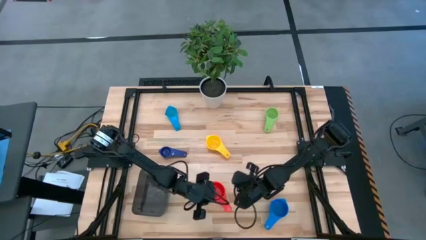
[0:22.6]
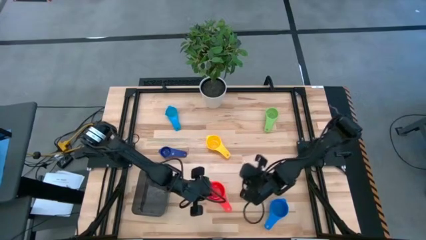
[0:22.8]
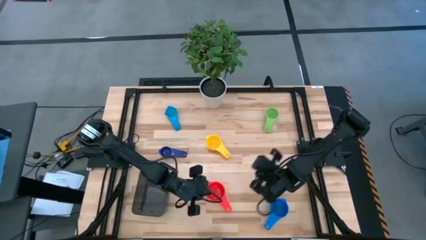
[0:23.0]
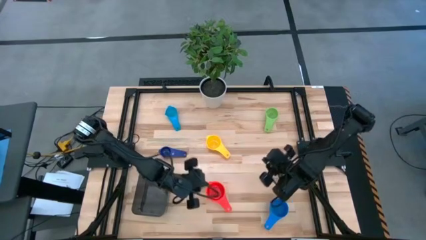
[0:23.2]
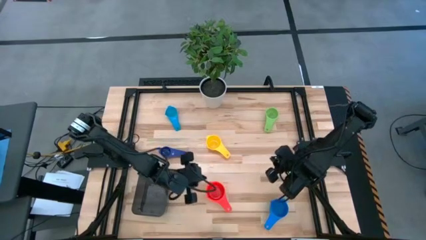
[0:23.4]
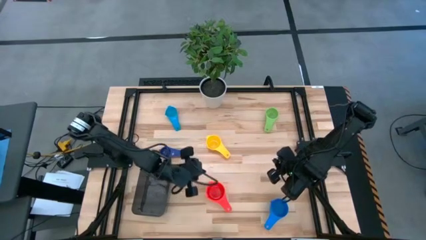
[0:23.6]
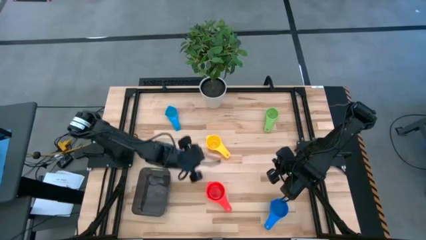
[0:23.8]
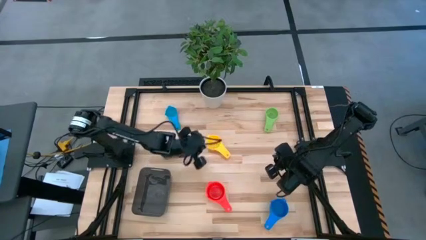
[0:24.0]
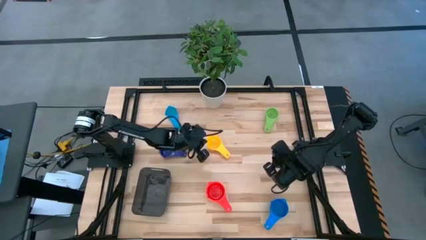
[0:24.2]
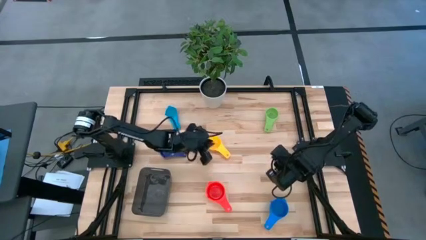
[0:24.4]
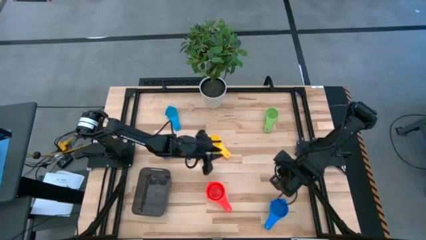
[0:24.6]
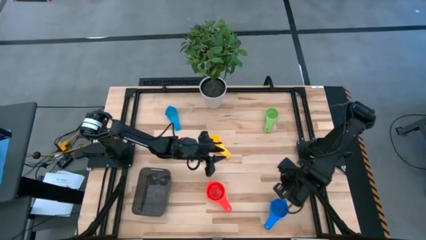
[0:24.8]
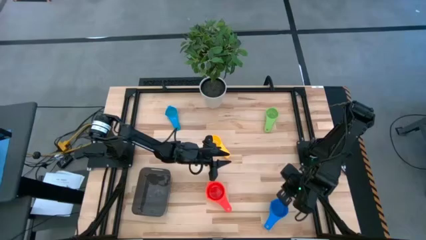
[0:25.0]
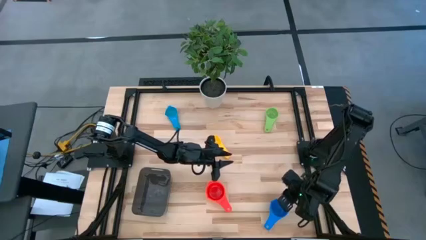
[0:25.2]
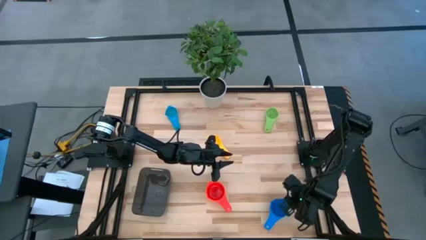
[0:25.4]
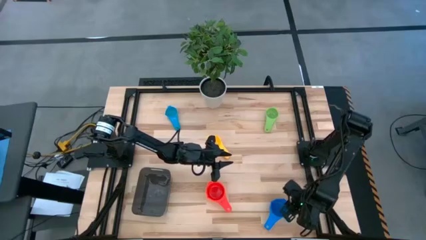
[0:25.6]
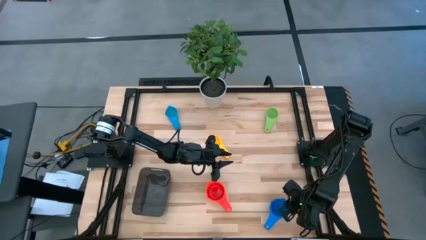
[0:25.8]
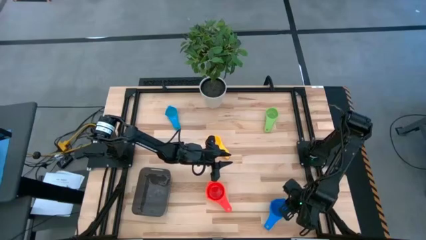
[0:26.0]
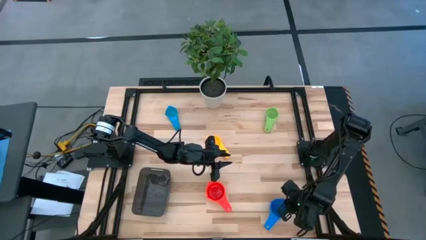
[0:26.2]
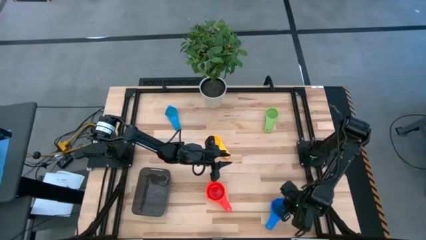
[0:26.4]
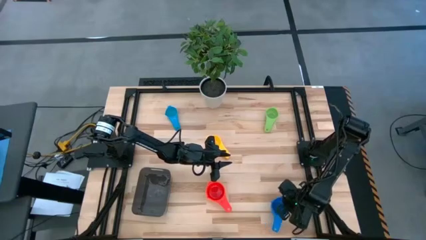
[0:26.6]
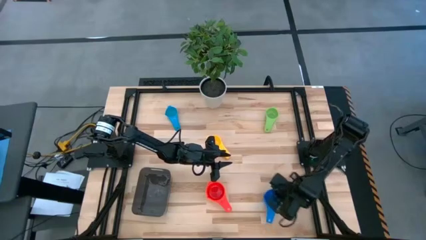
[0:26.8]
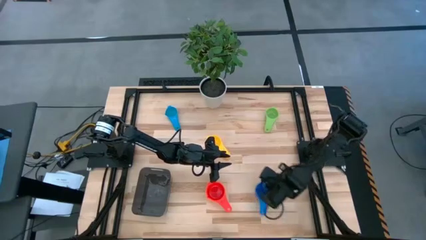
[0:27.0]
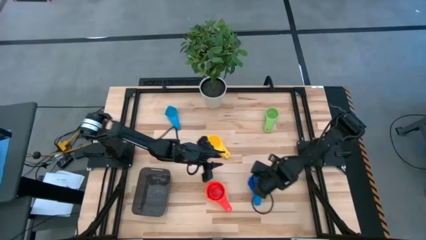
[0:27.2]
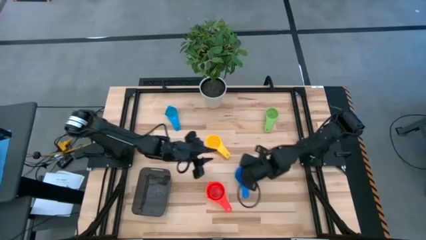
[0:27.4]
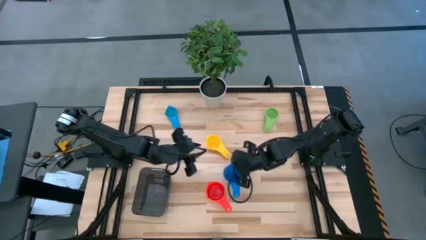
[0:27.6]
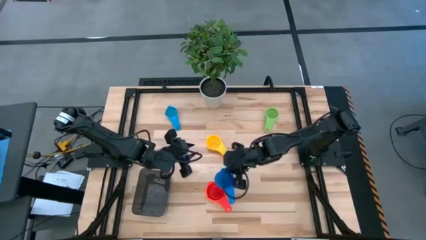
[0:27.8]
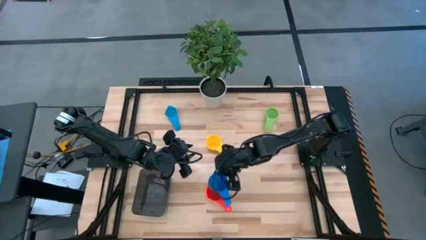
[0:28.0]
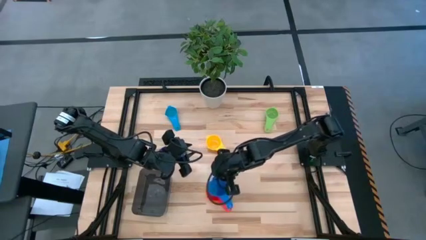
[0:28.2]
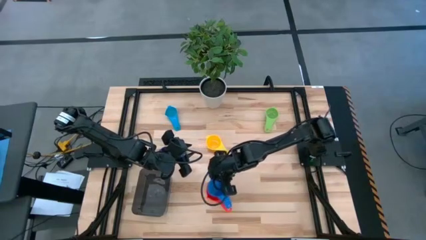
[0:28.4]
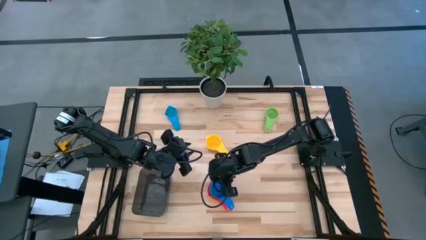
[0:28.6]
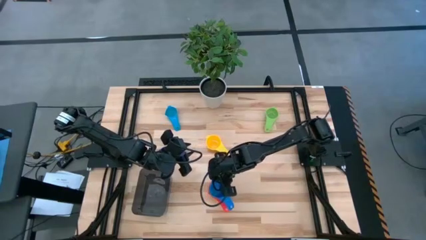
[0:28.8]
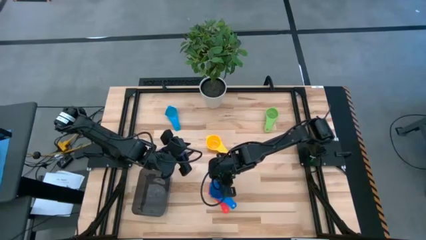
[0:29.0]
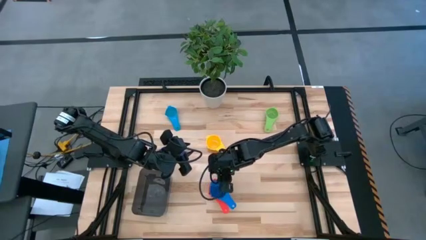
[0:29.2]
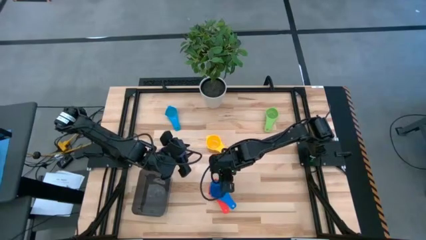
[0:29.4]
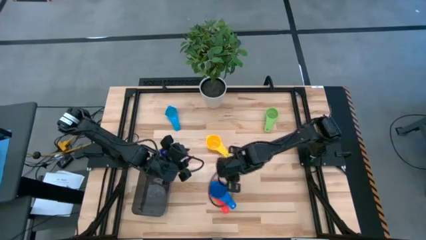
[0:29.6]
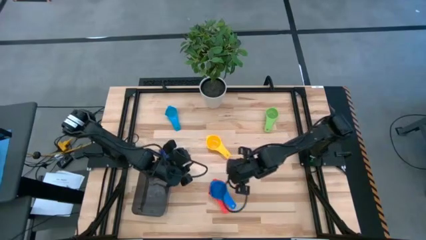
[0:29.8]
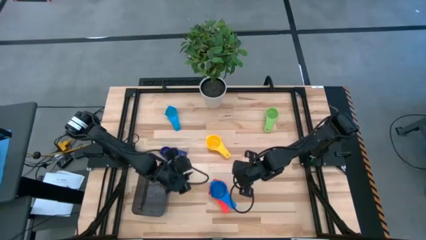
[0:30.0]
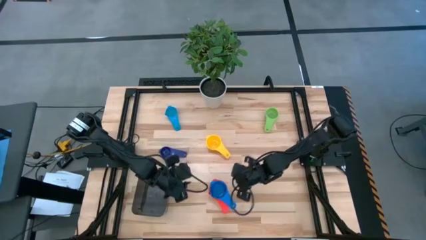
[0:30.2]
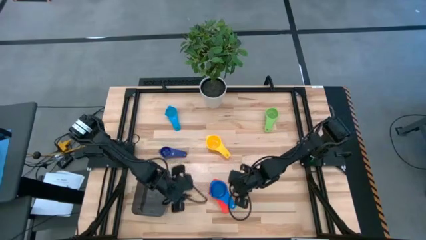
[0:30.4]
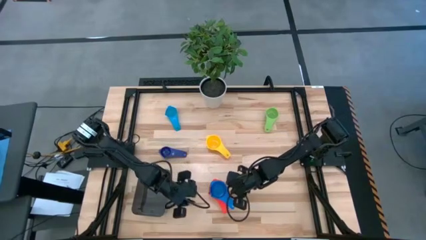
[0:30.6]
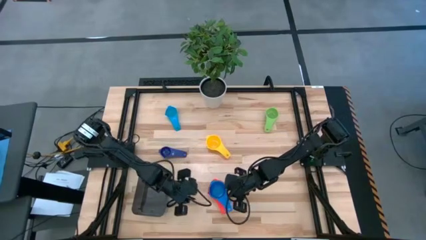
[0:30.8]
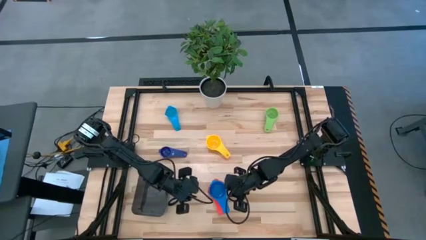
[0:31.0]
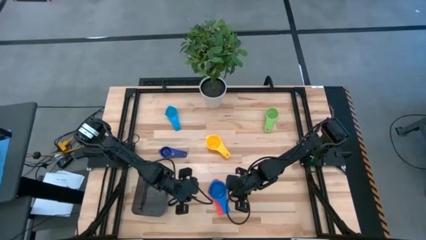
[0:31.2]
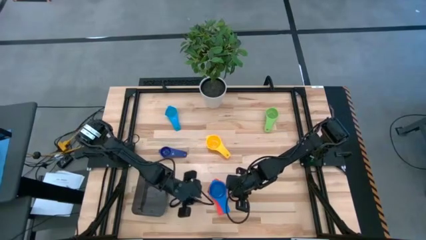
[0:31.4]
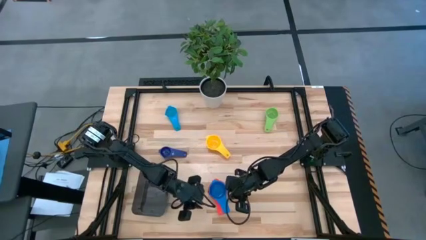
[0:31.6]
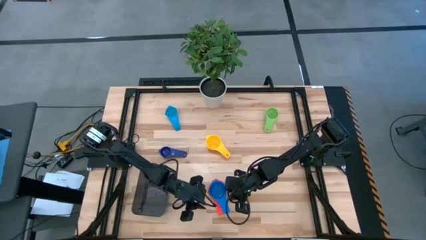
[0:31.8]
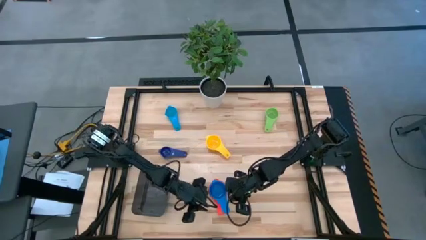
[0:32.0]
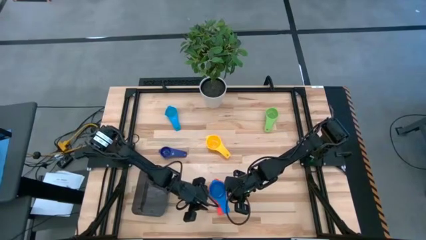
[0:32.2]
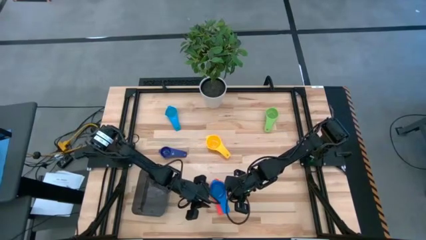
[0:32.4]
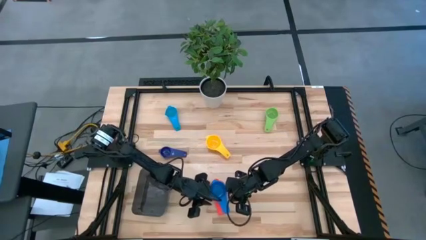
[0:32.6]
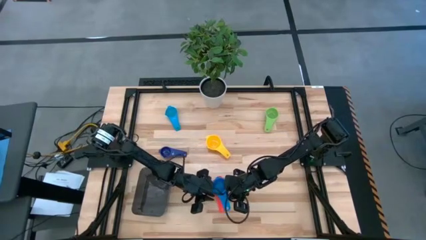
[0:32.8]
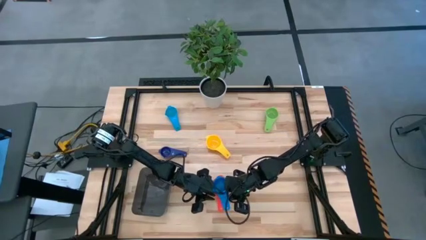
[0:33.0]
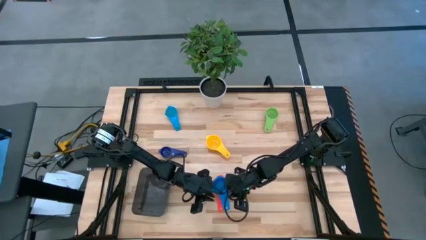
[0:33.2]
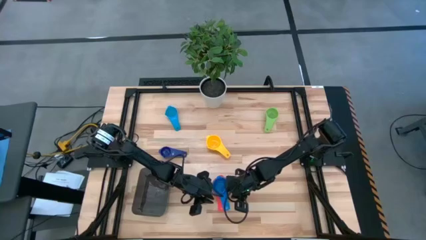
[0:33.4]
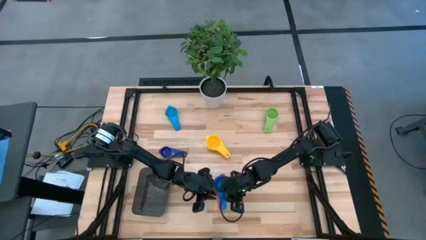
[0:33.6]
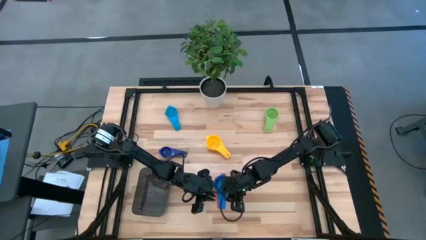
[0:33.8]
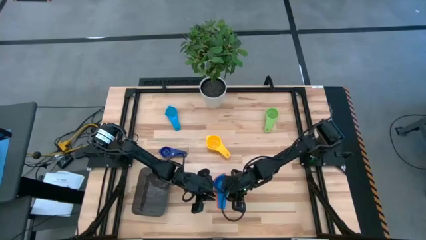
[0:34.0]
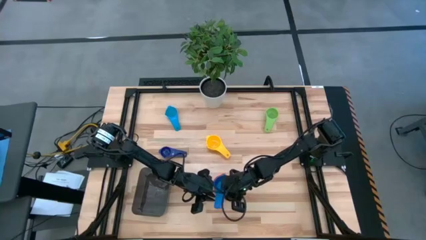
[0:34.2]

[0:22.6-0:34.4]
Task: Nest measuring cups in basket
Stack the blue measuring cup on top of the red measuring cup

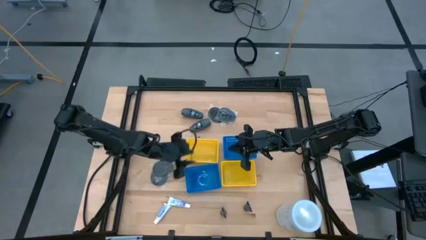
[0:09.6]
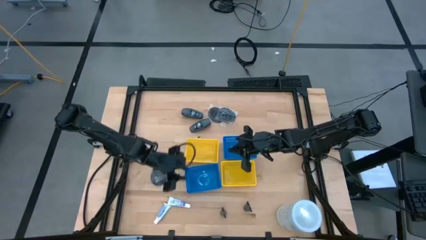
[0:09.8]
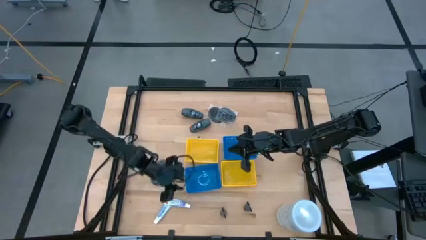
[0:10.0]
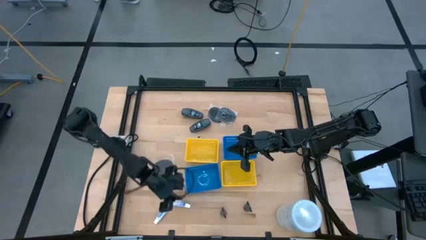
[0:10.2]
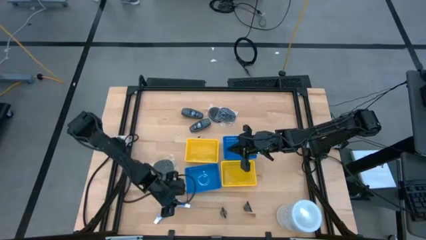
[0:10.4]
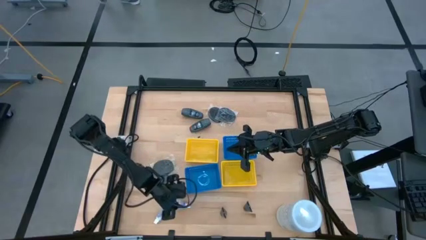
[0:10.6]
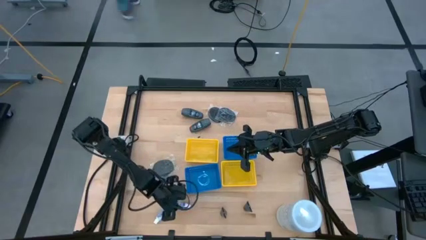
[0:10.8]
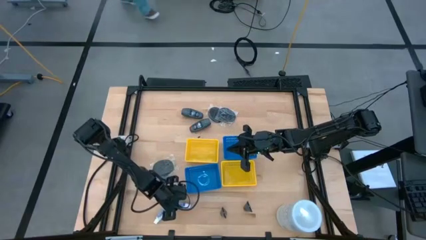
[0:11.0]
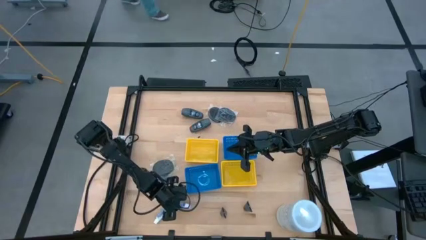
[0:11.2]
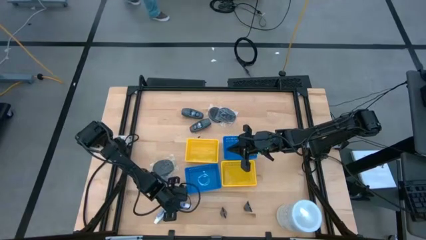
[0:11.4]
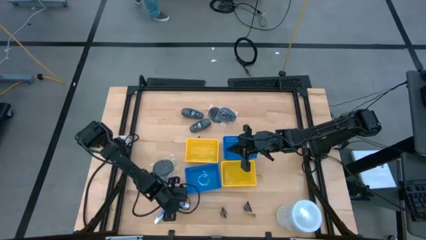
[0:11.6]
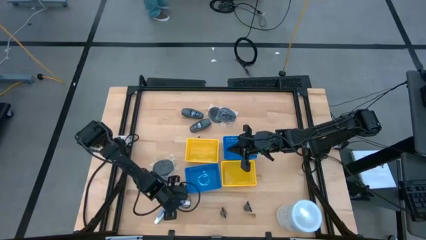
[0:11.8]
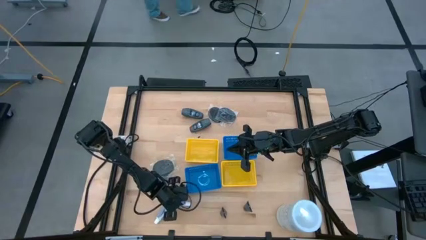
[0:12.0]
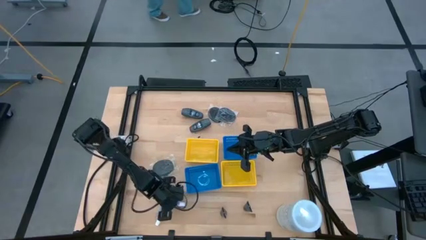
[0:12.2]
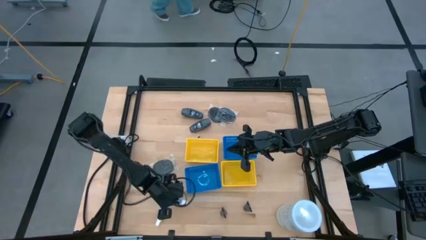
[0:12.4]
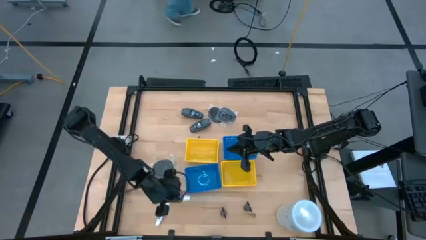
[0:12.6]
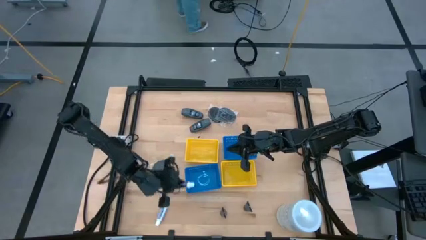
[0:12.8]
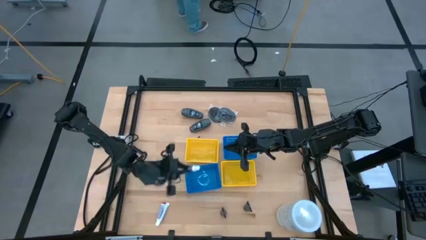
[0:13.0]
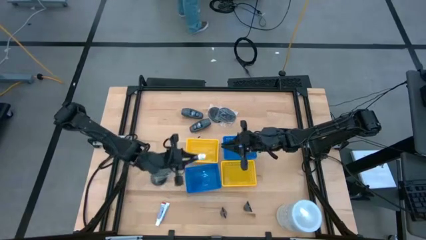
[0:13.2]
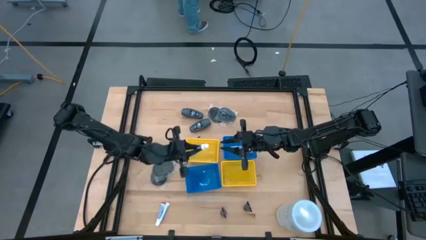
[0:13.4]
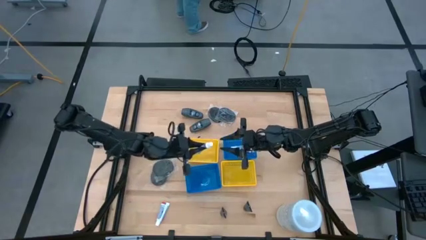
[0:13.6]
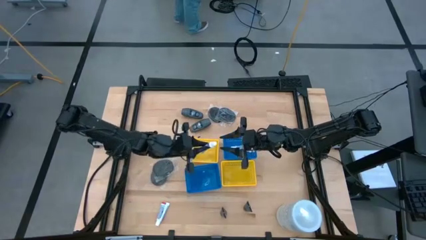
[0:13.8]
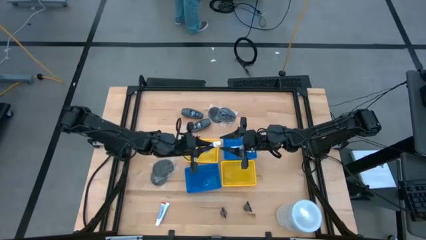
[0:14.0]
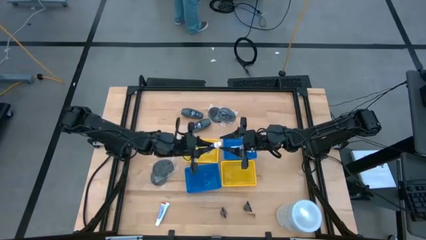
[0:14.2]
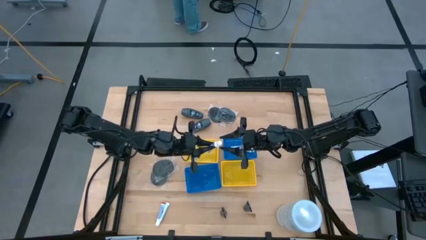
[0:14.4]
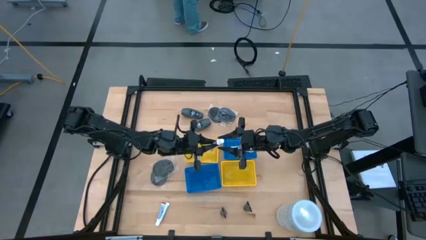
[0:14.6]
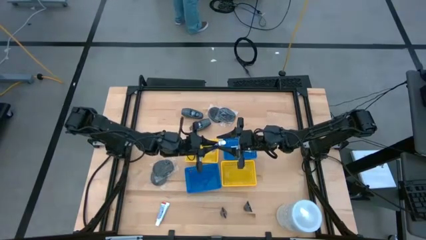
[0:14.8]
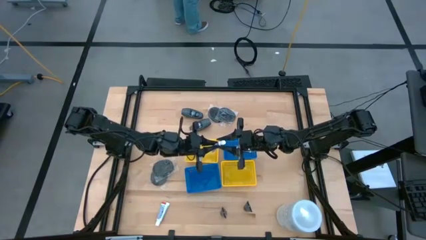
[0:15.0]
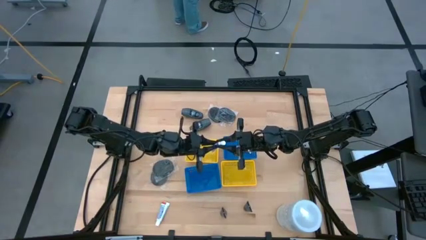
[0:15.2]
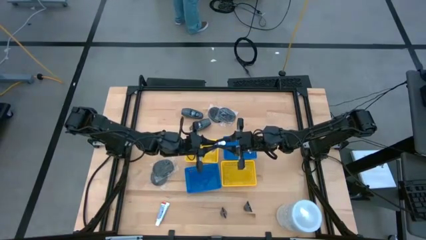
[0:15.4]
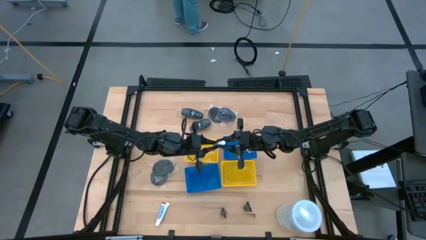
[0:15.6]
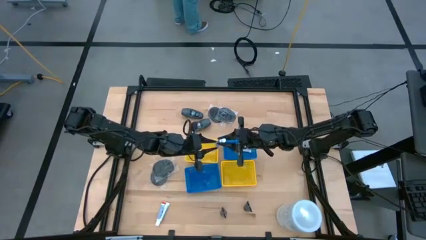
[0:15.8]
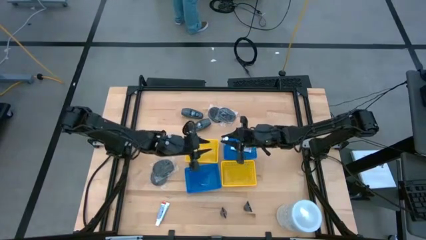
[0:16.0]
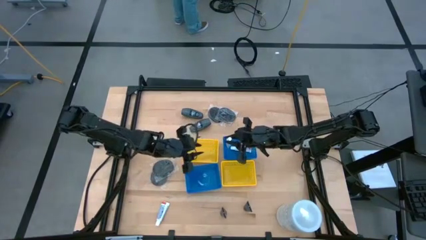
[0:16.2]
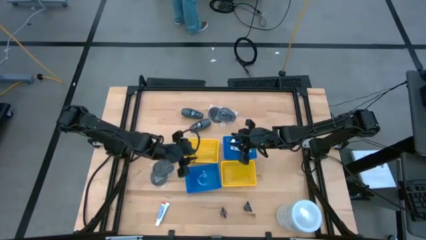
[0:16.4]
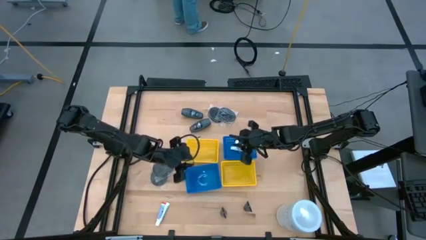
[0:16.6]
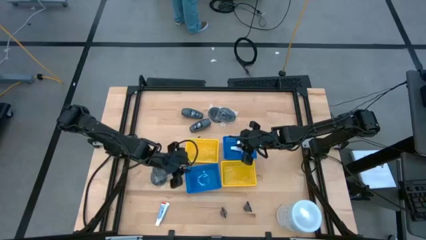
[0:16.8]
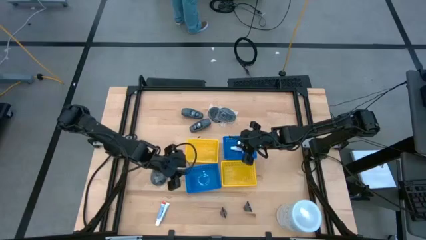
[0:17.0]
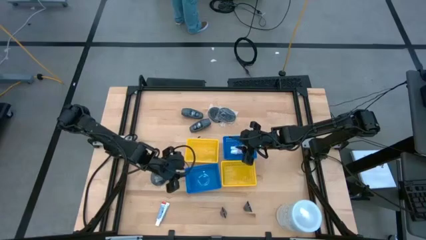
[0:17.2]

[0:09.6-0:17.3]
Task: Pick & Place Travel size toiletries
Put the right toothpaste into the top right blue bin
